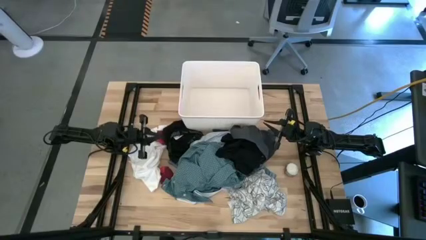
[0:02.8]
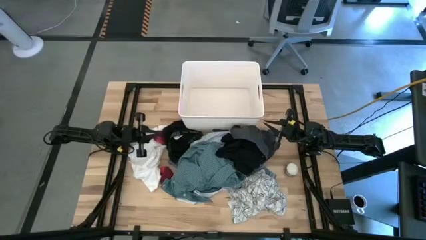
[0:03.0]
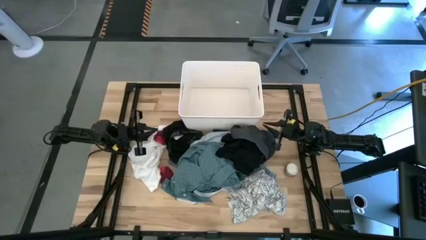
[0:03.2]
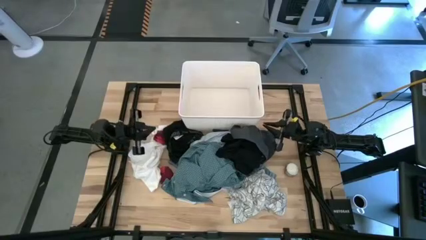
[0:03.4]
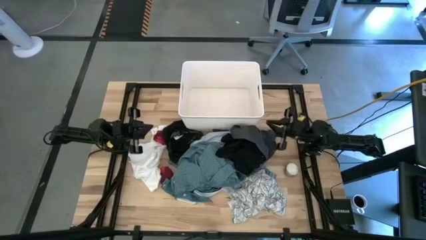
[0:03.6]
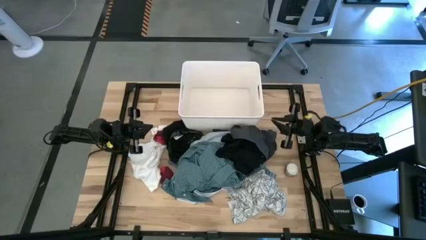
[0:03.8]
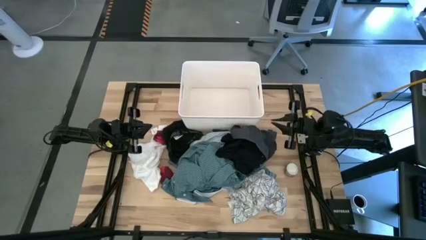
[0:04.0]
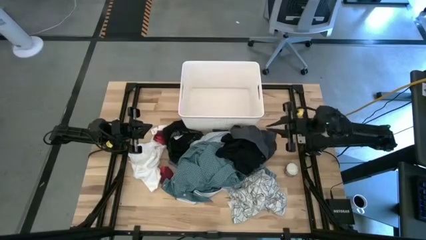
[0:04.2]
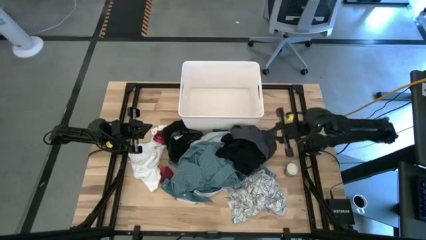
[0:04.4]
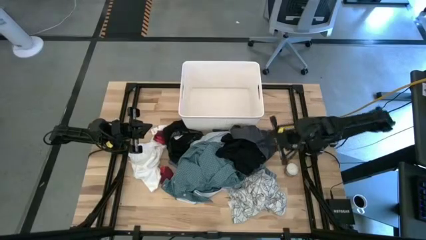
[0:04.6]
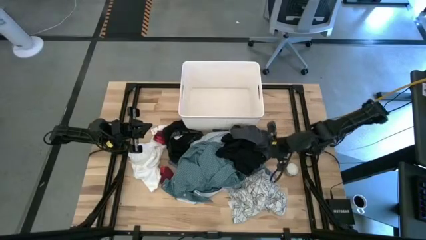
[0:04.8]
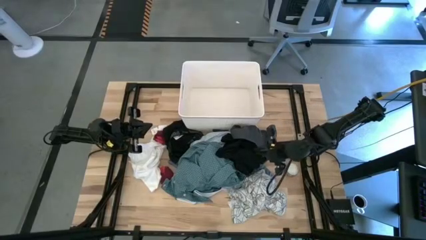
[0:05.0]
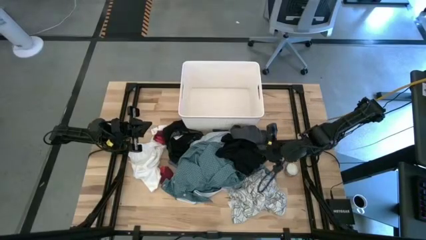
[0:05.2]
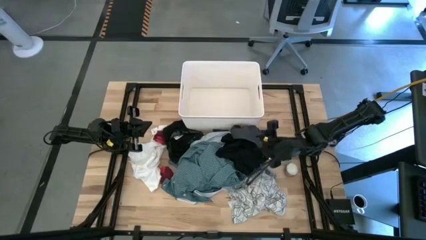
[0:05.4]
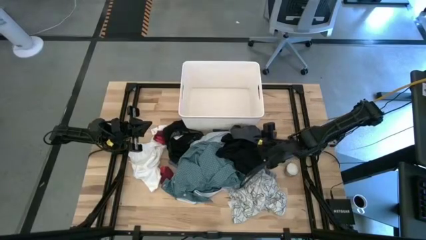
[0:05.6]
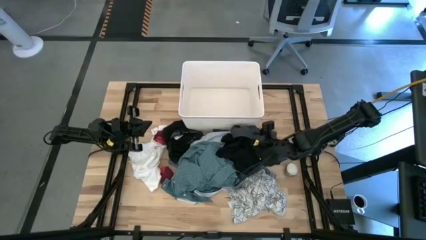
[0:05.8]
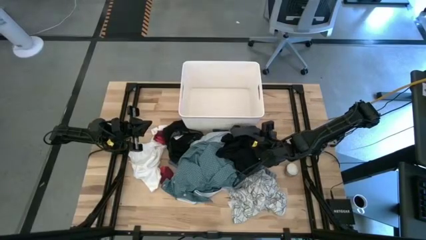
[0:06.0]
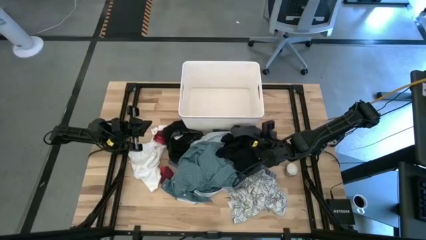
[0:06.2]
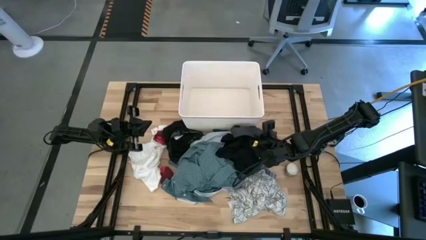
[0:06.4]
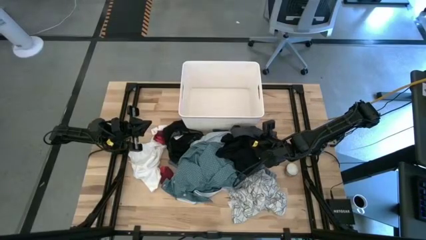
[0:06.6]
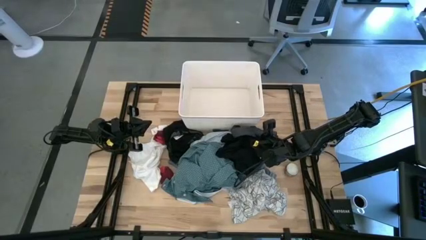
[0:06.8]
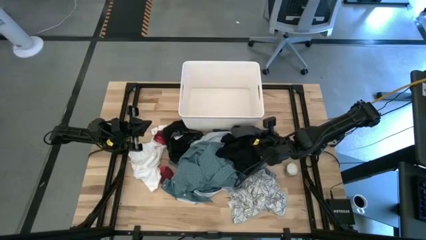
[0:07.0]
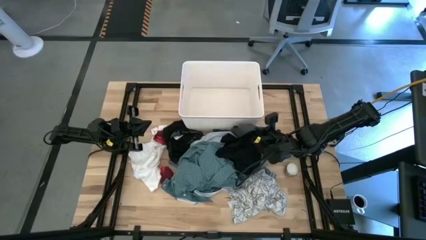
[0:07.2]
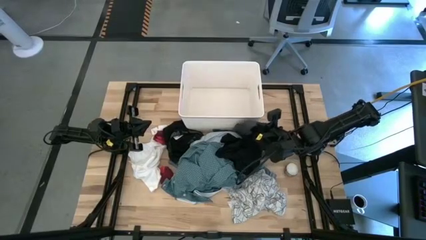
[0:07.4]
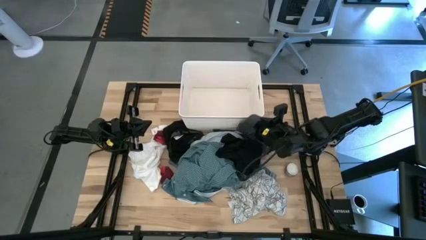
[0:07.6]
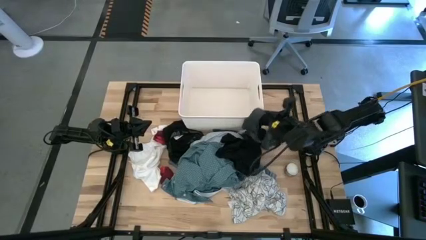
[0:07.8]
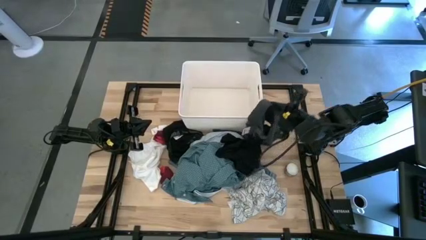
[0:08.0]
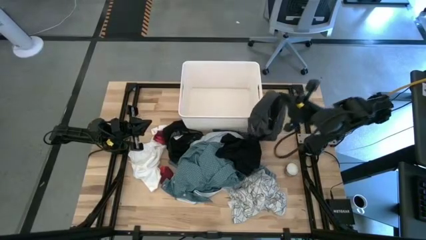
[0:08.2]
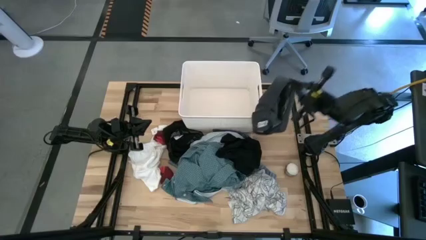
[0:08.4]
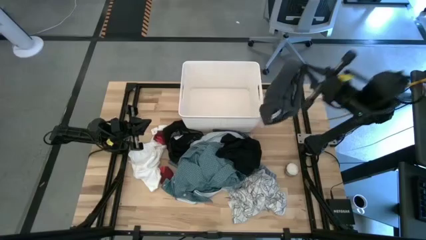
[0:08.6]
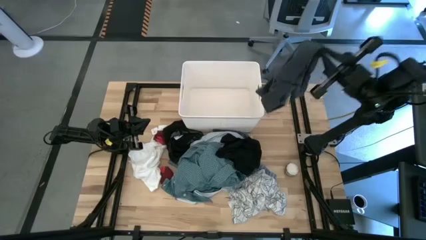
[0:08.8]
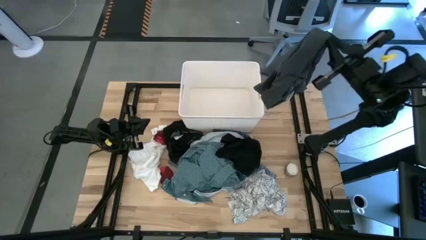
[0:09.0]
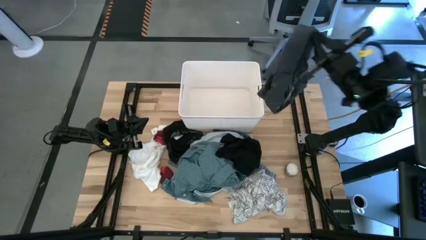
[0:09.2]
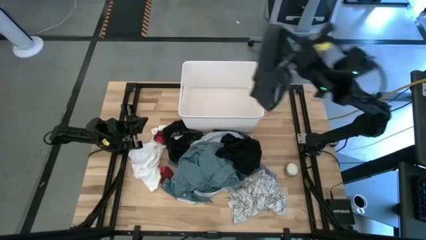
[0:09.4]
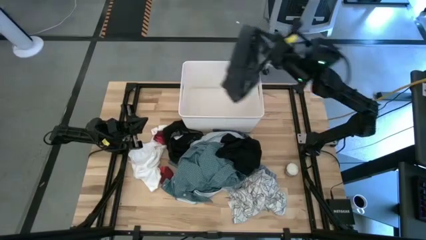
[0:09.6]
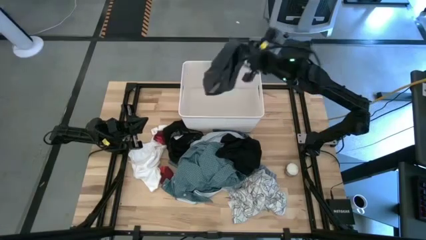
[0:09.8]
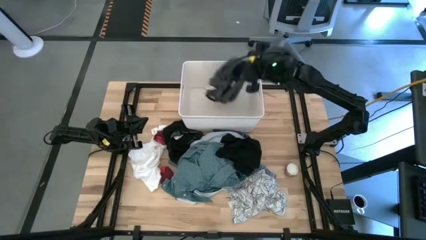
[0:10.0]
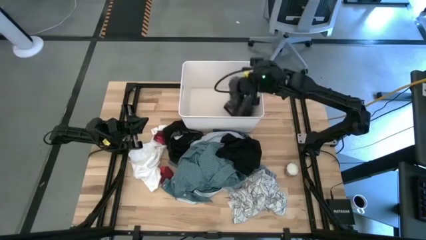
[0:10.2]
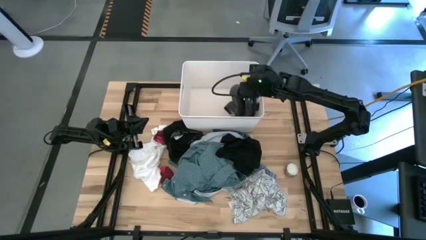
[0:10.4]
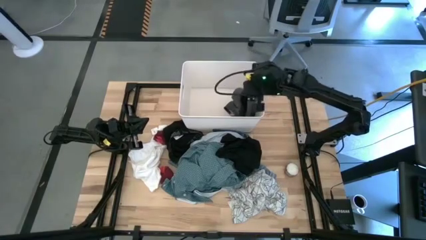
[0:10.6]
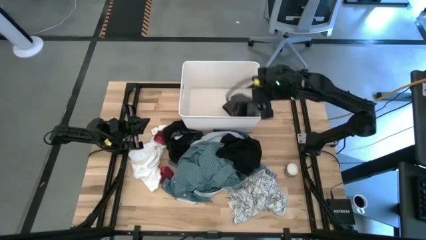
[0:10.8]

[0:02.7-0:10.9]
Task: Sort clothes
Put the gray short into the white bin

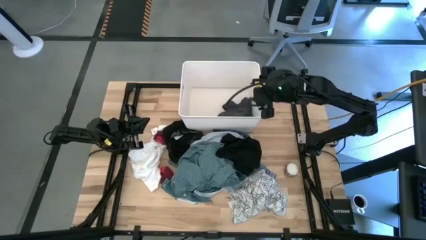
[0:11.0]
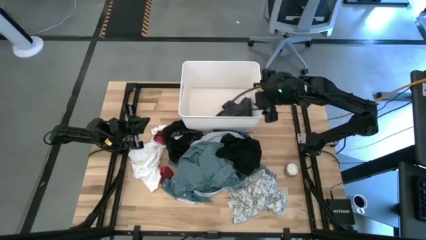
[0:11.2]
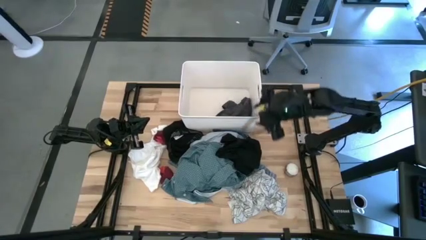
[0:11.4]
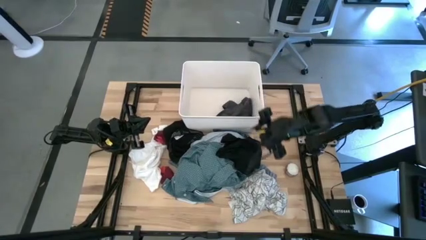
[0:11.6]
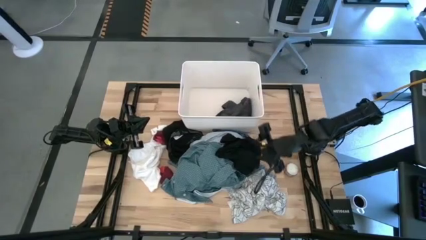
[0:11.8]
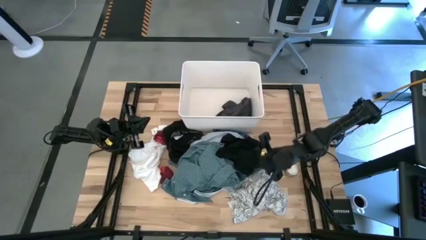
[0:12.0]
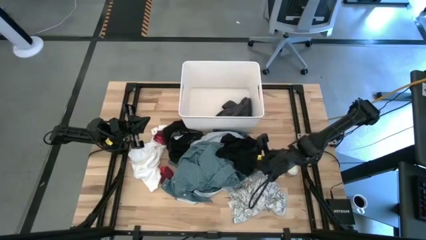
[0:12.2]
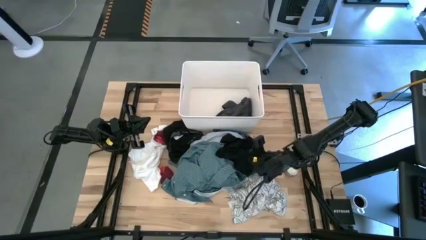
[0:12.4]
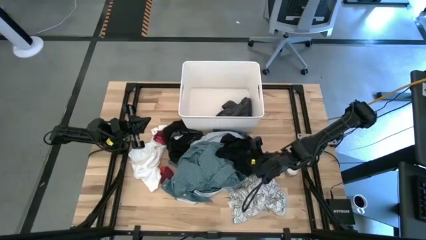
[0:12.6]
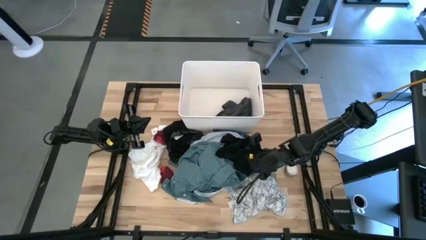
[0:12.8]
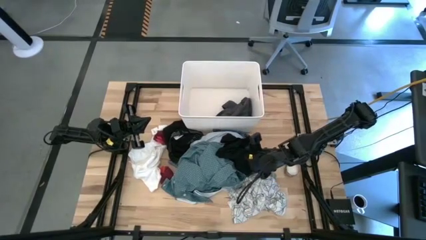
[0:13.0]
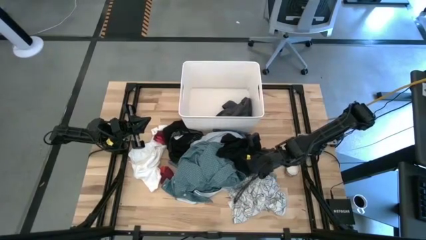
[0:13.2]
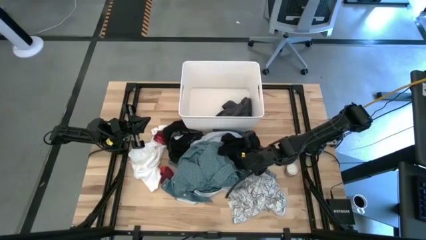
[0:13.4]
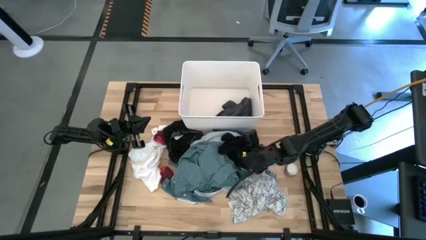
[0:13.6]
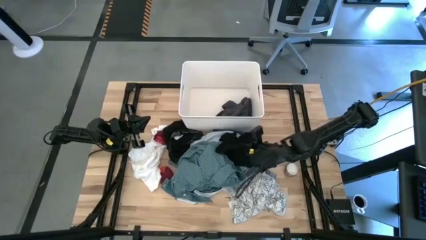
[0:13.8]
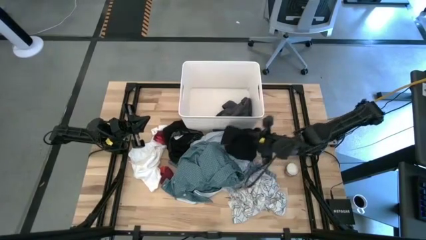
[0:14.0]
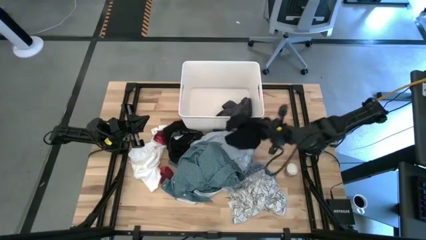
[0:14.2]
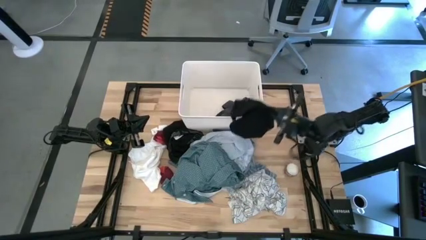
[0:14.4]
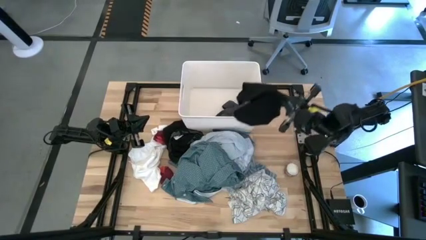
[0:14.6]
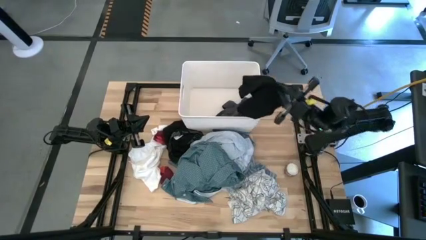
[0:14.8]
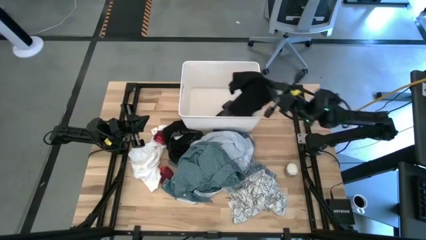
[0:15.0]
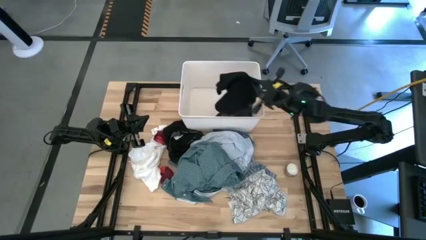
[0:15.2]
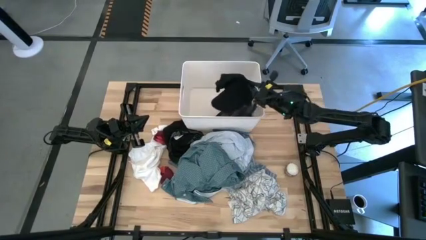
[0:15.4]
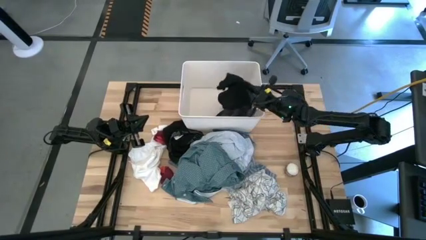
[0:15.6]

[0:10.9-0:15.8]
Put the right black boxer into the white bin

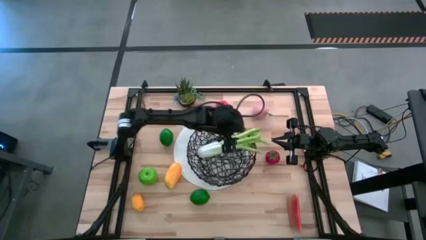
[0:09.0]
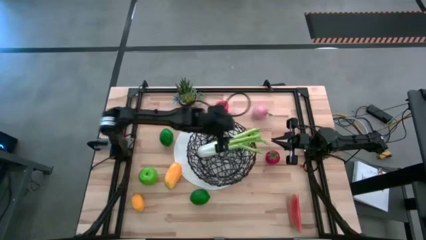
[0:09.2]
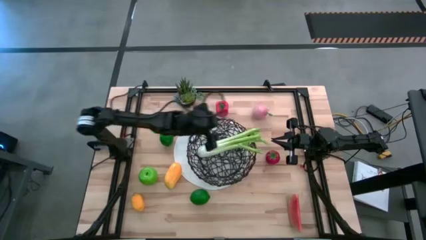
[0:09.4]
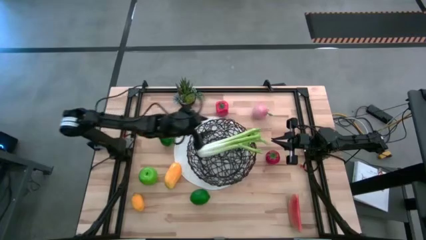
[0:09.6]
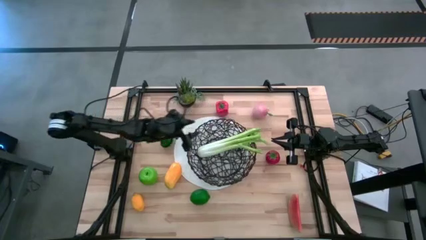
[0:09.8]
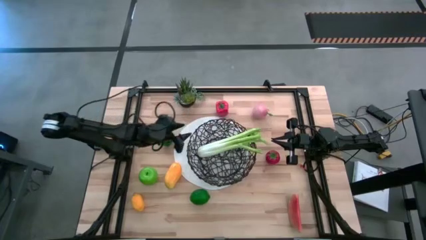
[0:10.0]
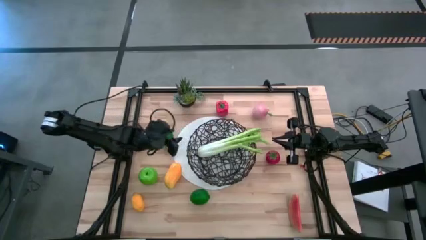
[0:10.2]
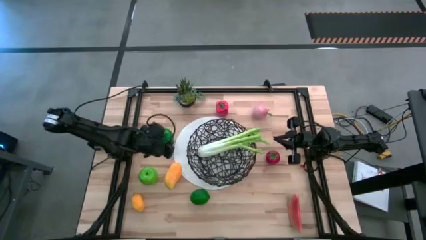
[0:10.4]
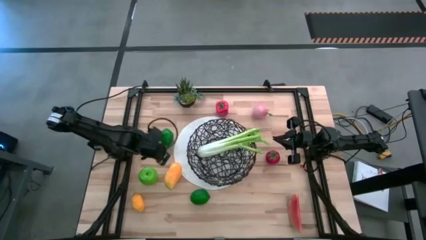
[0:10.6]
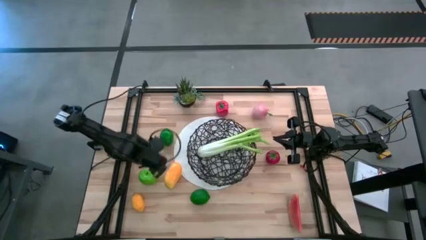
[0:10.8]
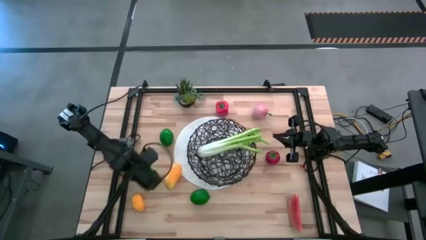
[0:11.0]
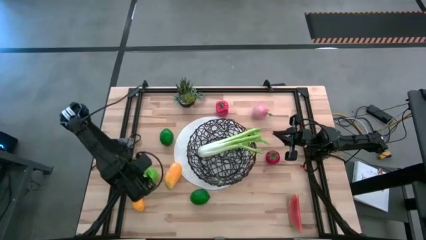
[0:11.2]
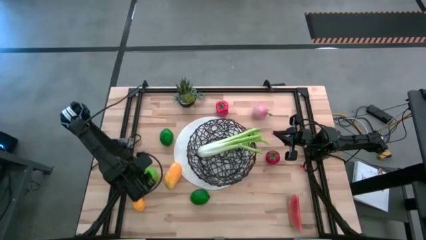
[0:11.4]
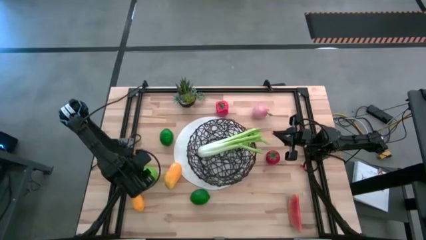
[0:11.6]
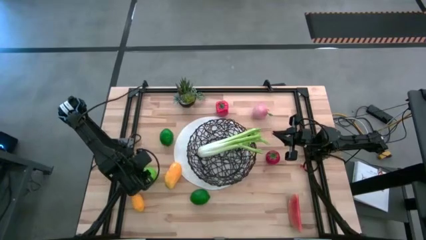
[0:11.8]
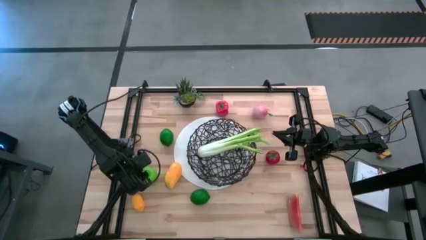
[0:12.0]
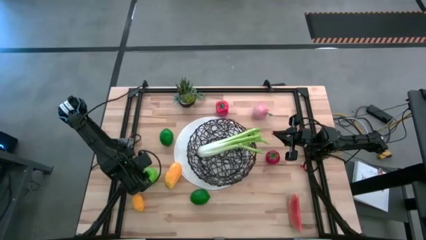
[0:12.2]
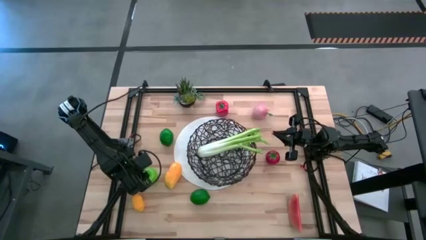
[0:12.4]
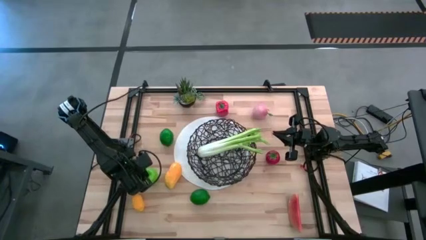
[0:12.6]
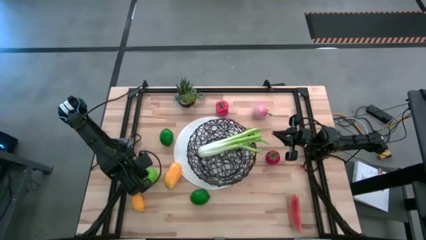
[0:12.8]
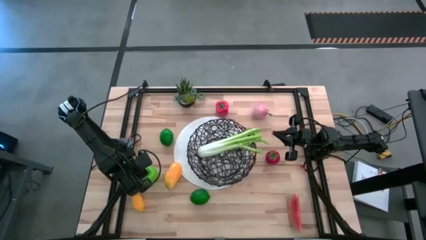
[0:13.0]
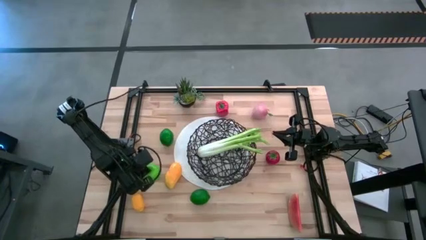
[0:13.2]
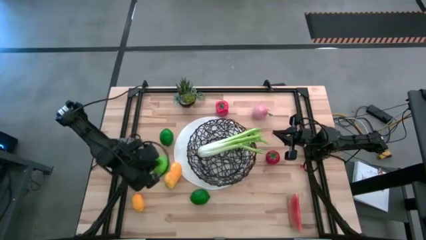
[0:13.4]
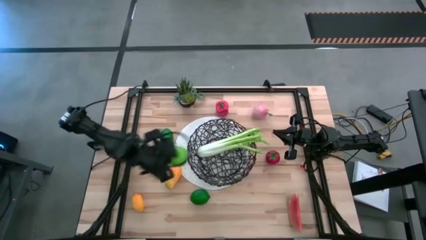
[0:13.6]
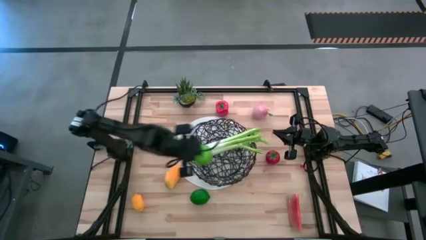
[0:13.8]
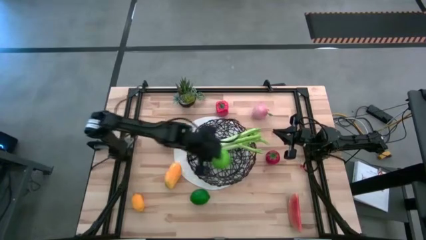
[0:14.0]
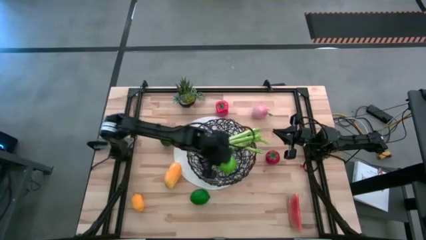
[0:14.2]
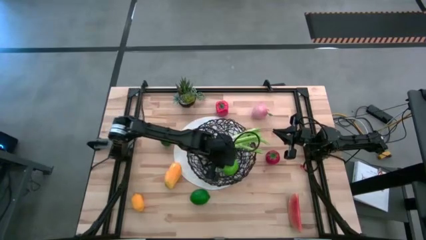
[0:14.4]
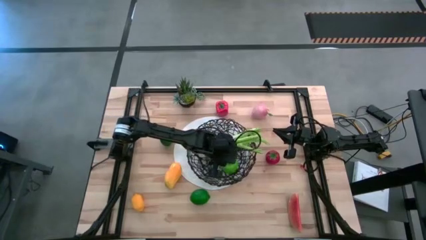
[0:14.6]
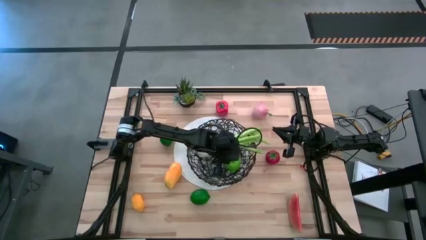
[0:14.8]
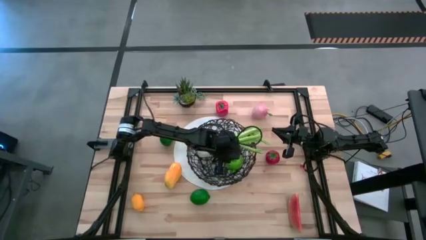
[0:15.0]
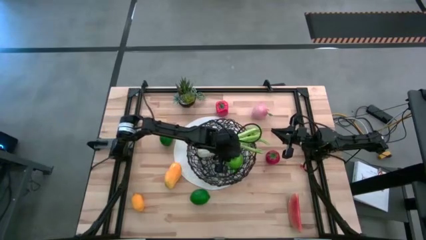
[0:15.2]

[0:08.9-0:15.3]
Task: Build produce basket
Put the green apple into the wire basket
